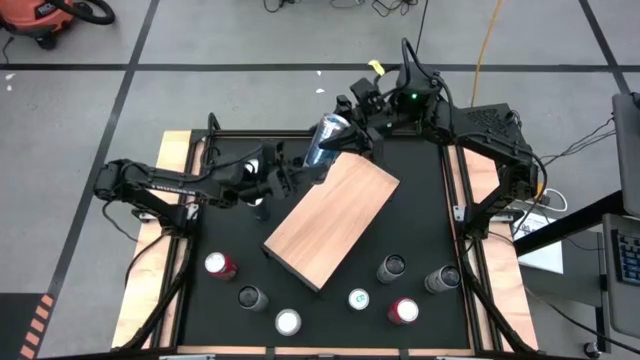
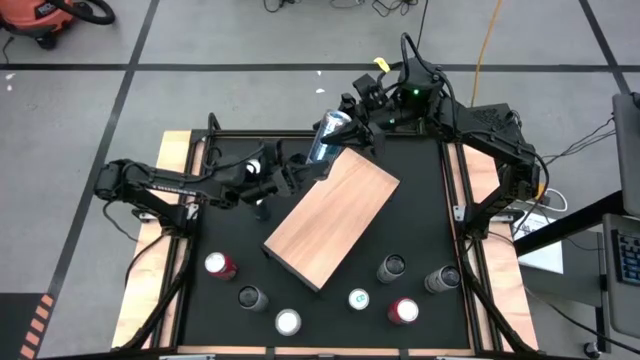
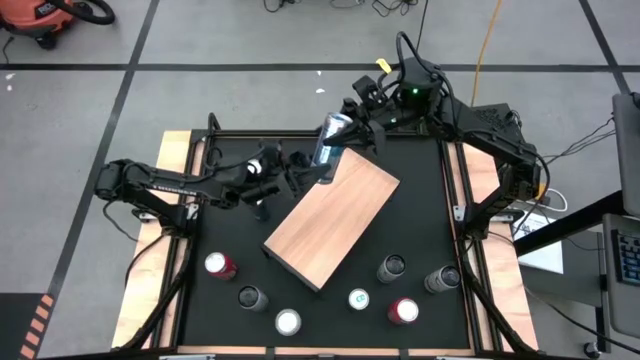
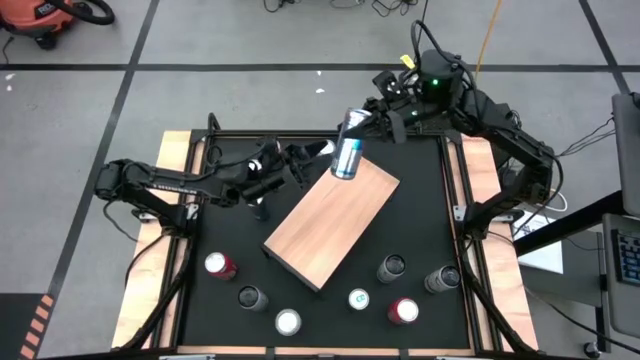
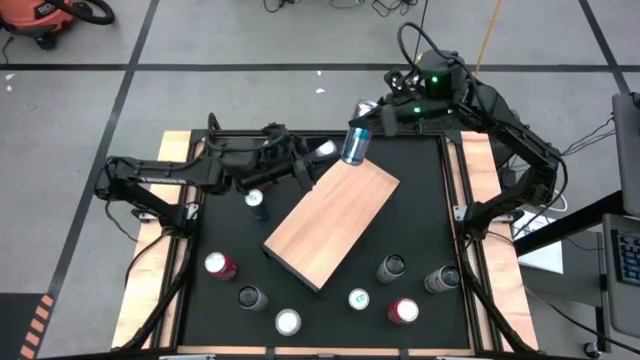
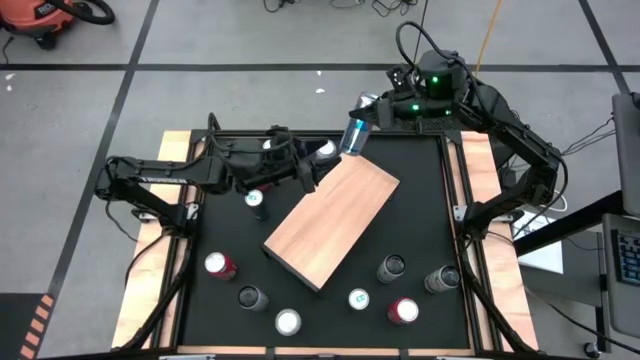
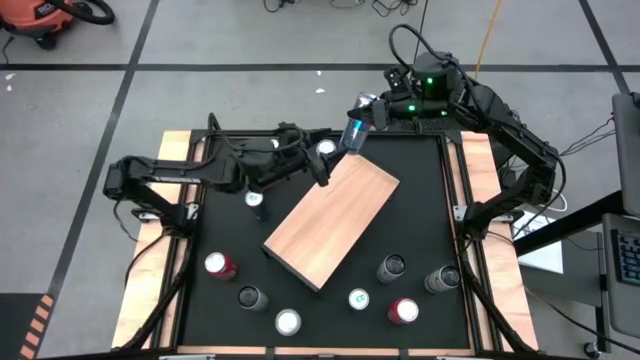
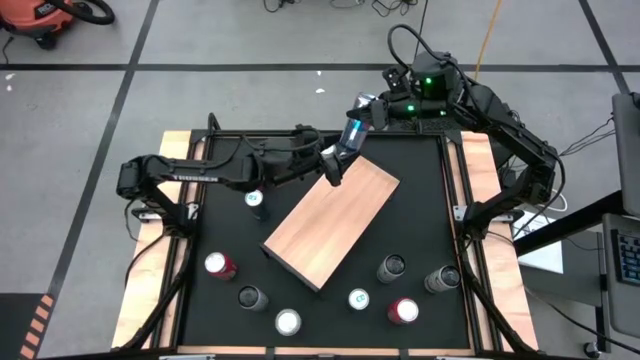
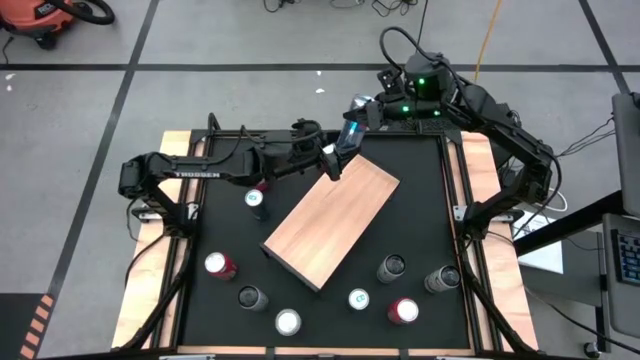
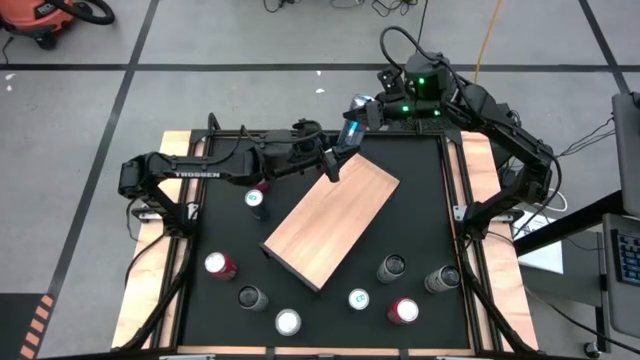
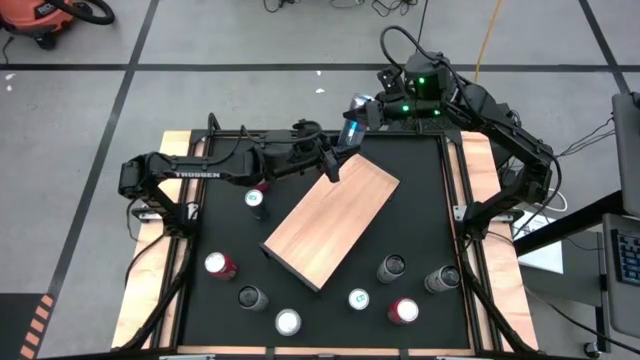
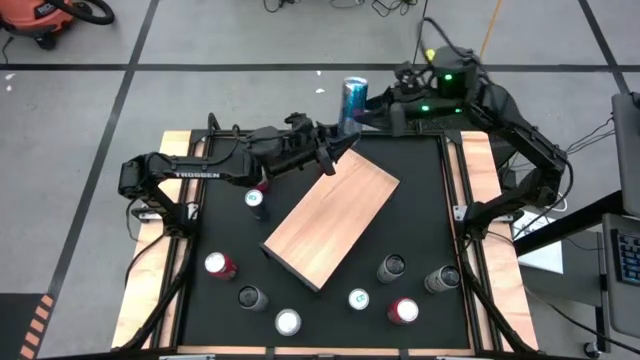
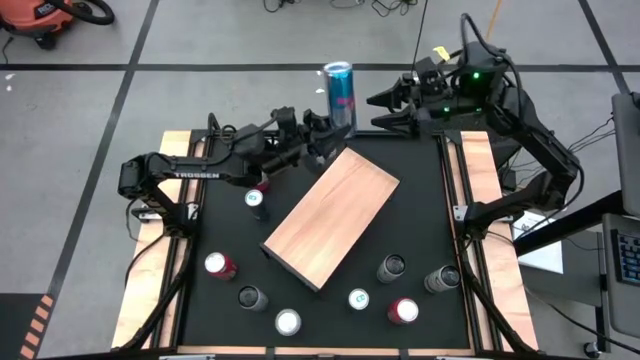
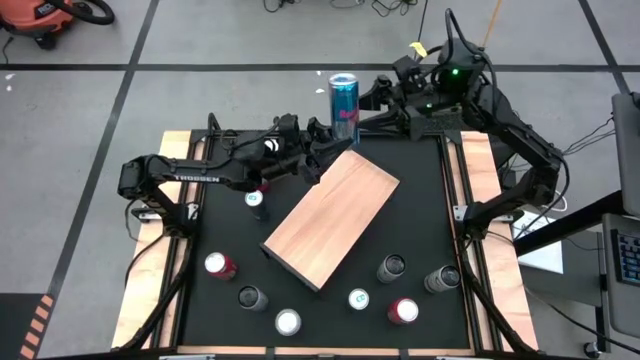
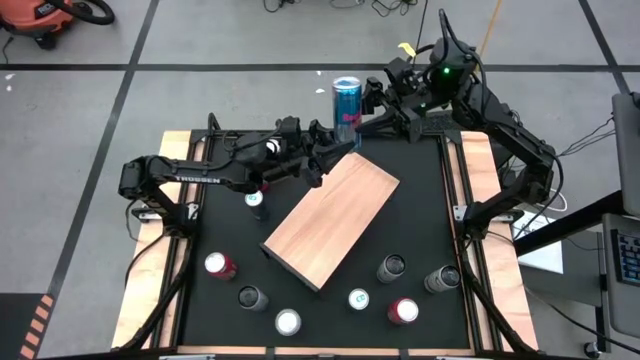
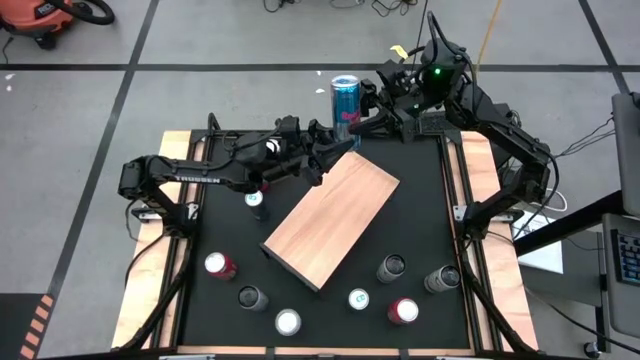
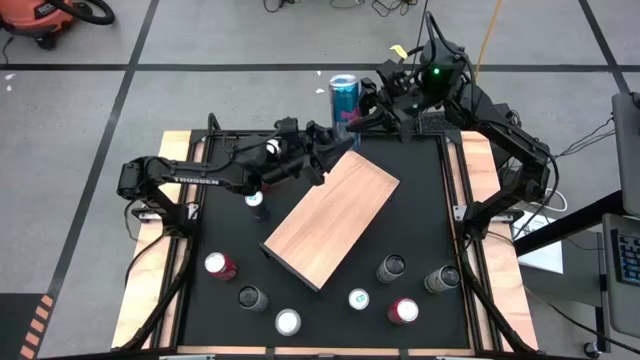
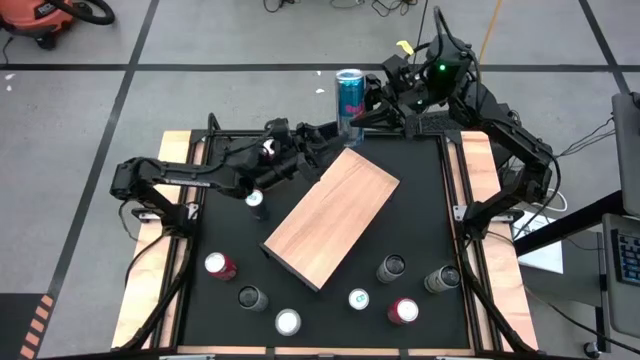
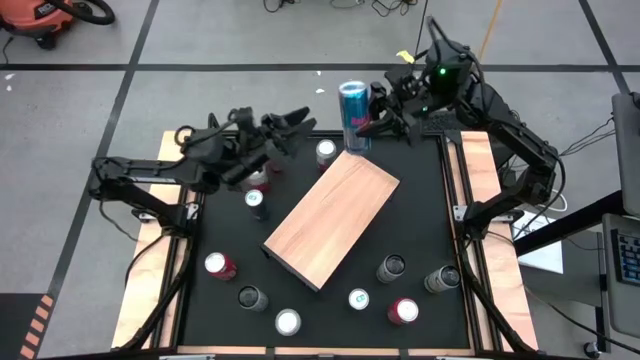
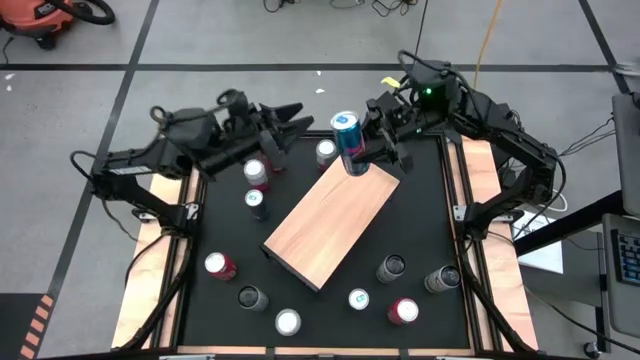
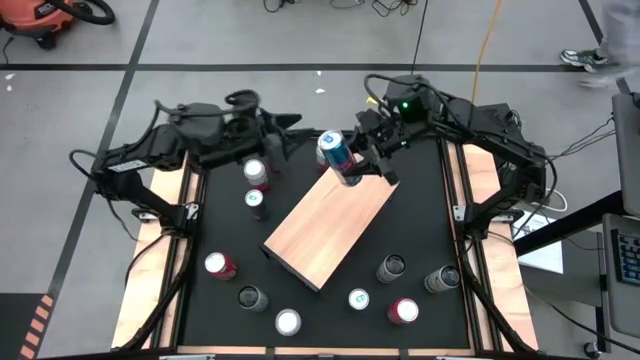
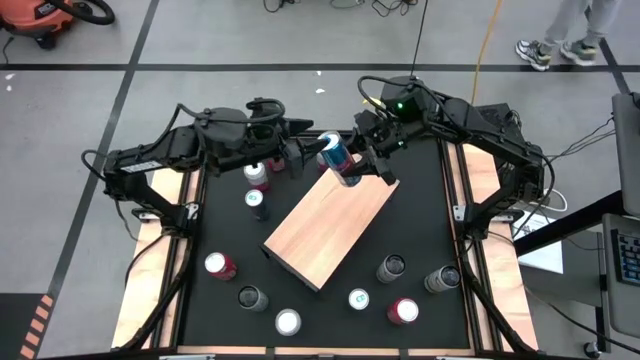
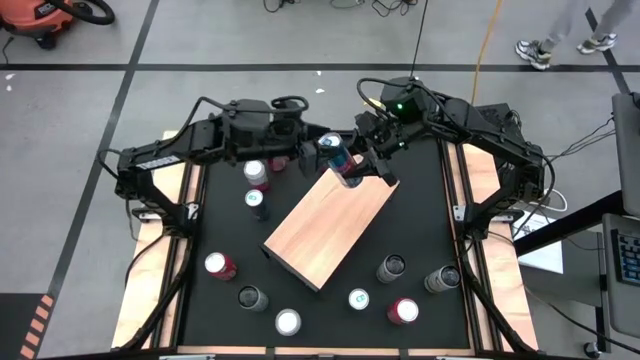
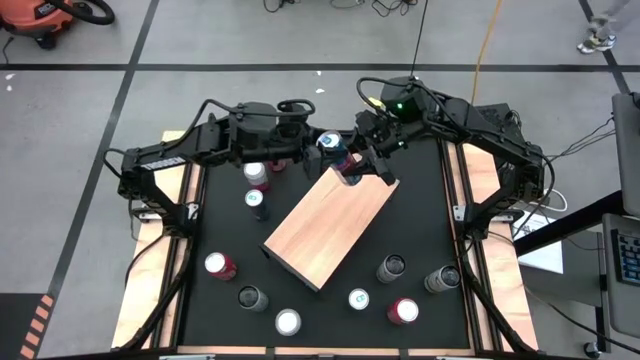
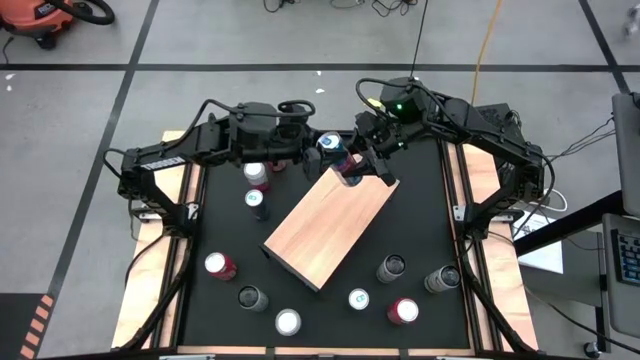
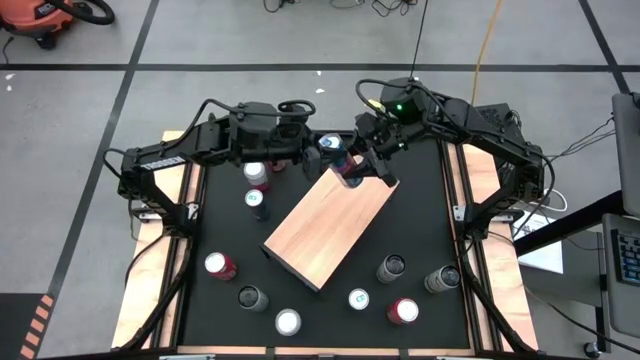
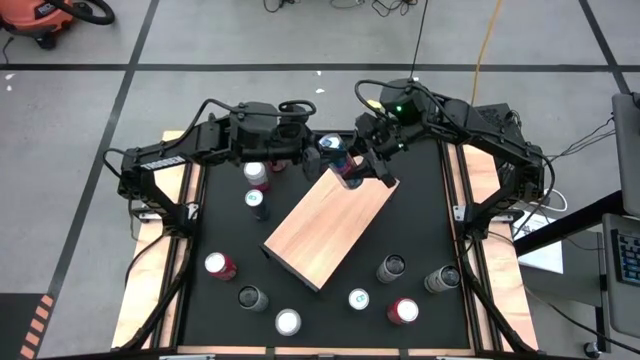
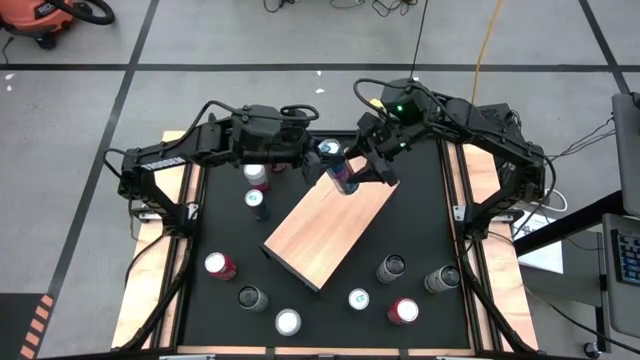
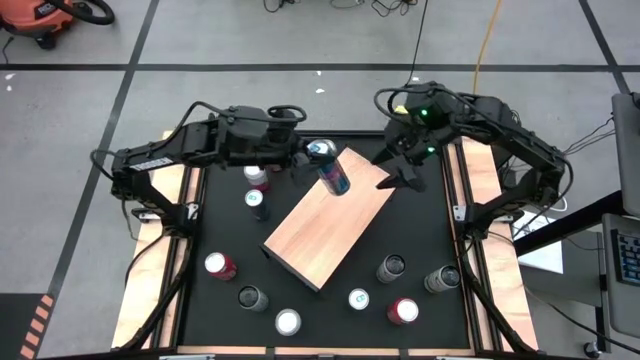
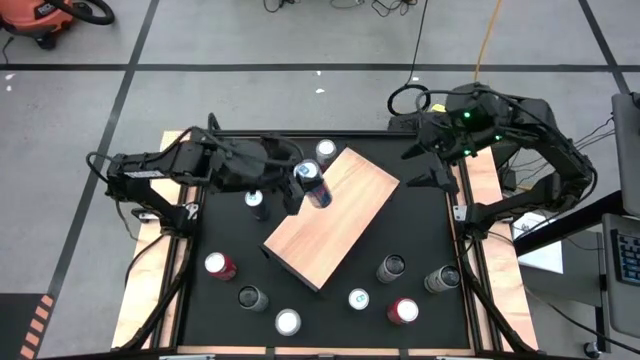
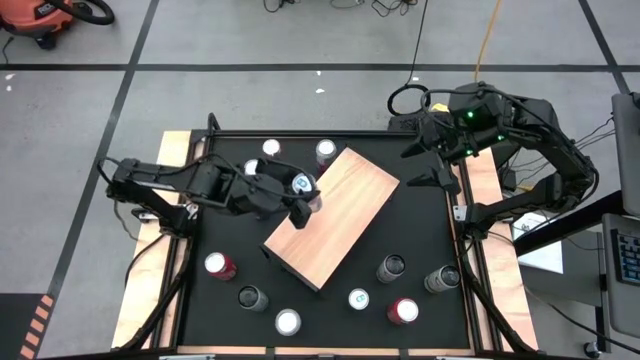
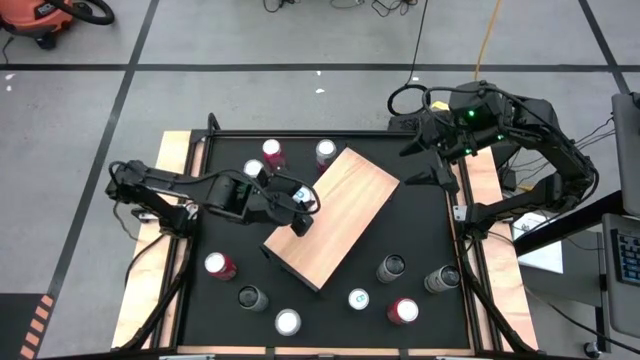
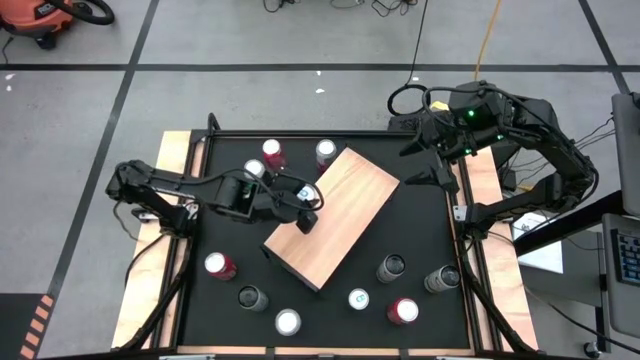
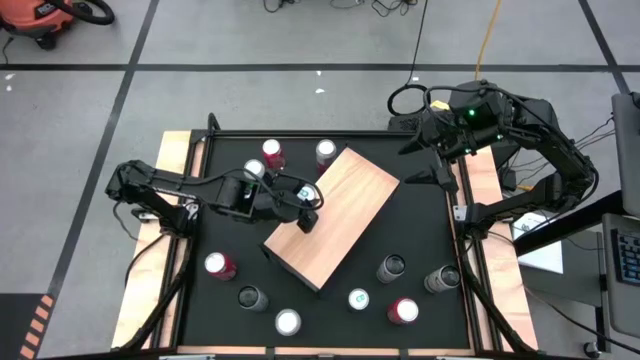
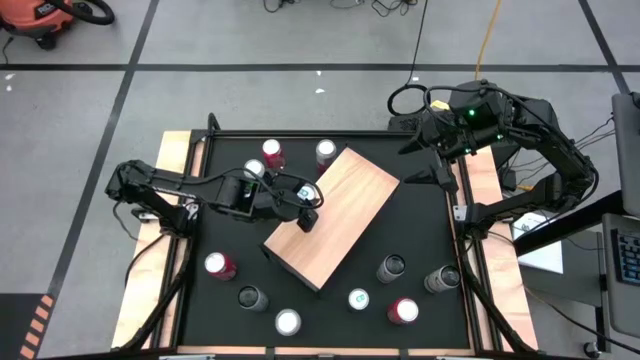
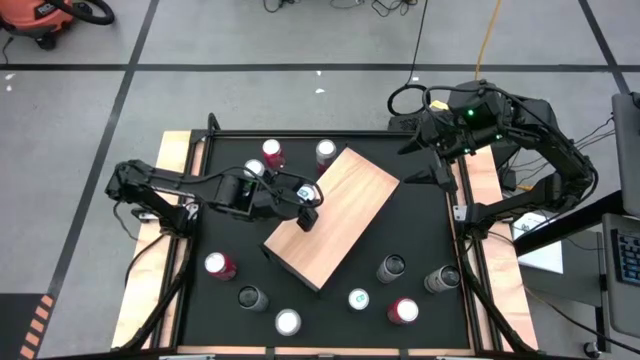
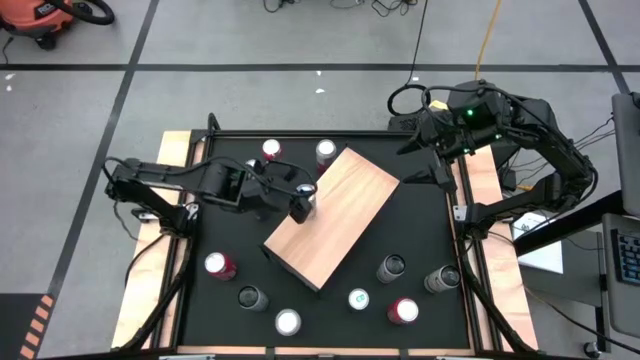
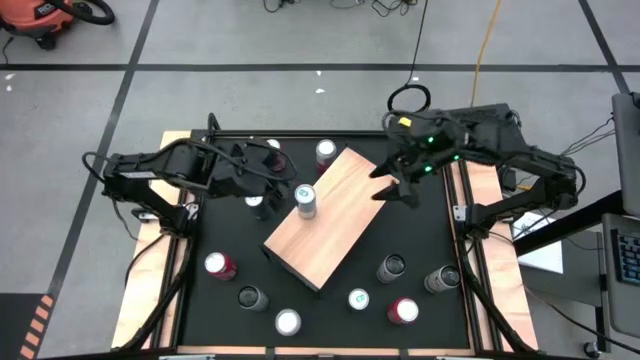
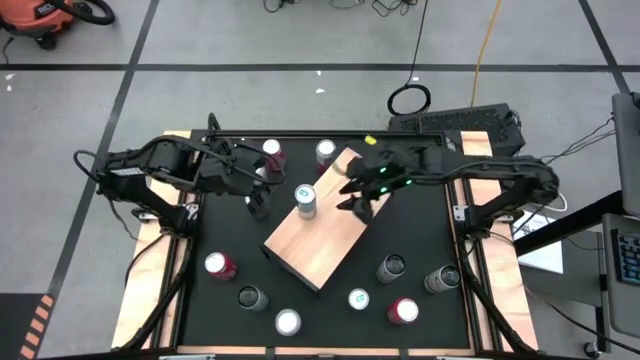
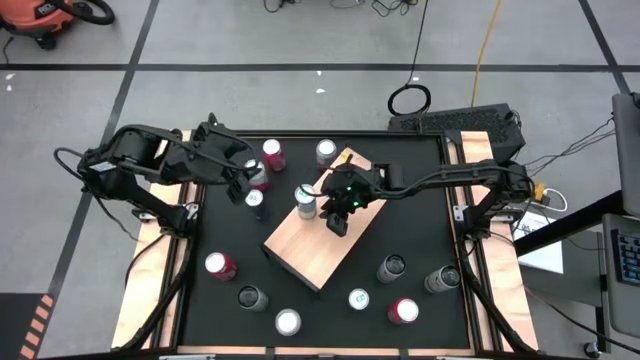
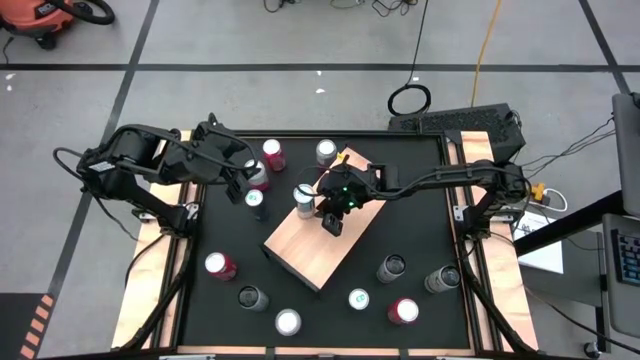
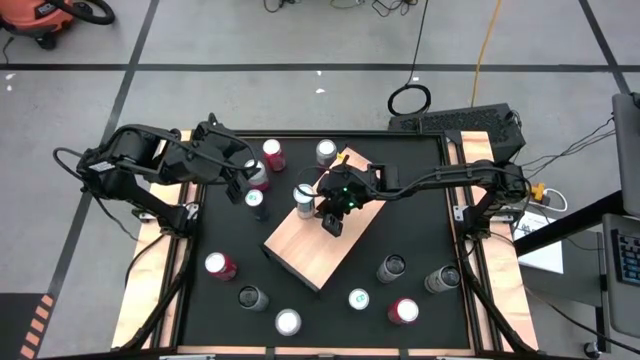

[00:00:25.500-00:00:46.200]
Task: Place canned beverage on shelf
Put the top blue soda can on the shelf

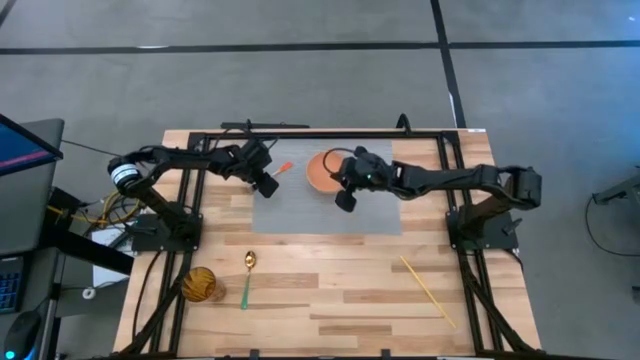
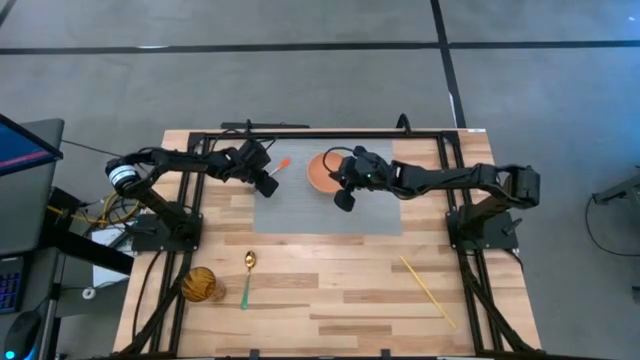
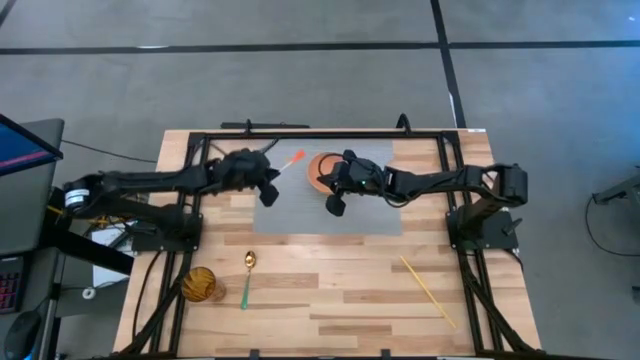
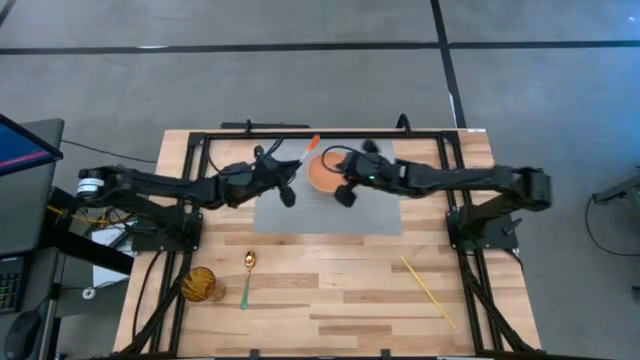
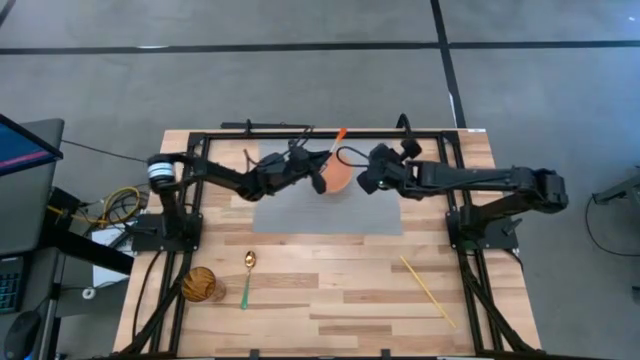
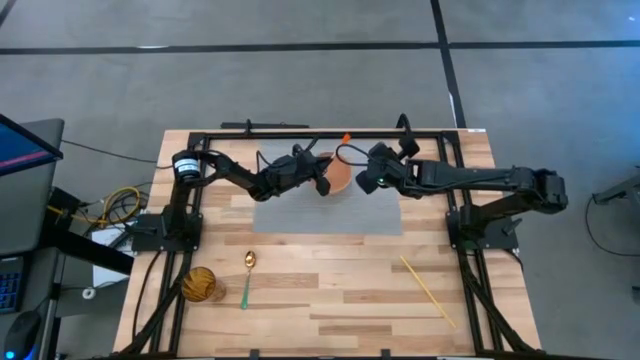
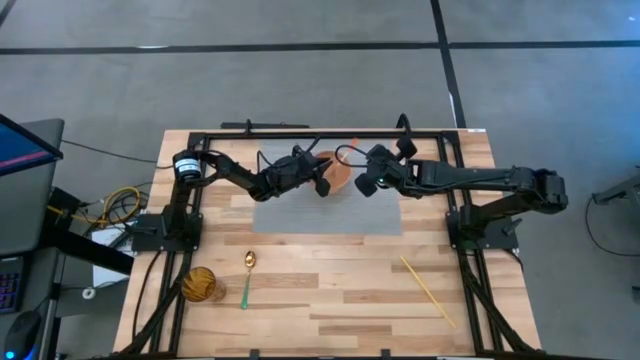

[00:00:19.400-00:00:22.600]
Task: Pick & Place Utensil
Put the orange fork into the brown bowl
